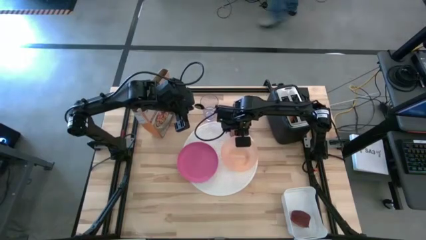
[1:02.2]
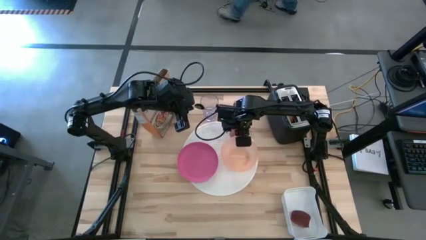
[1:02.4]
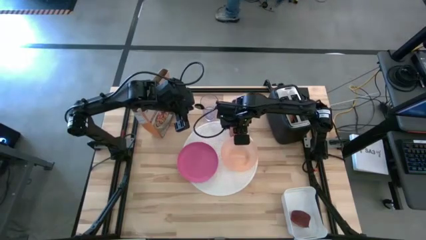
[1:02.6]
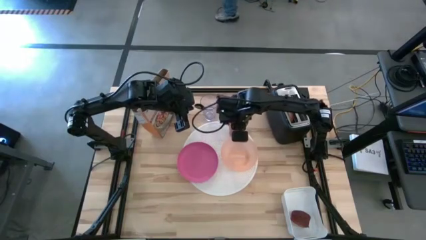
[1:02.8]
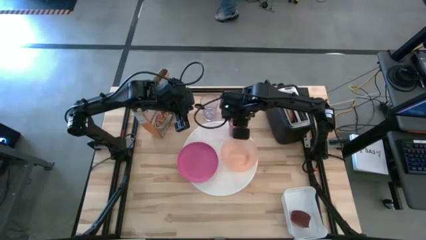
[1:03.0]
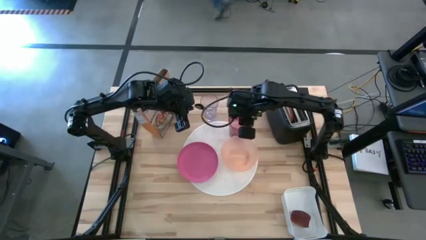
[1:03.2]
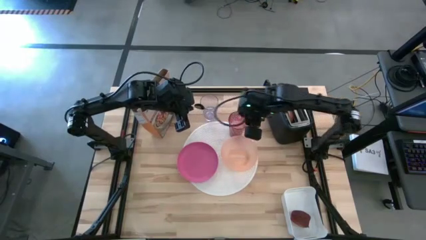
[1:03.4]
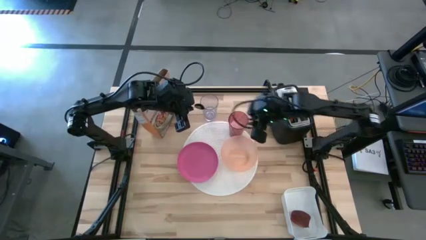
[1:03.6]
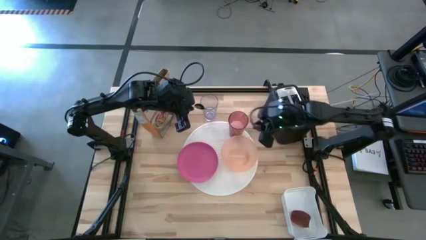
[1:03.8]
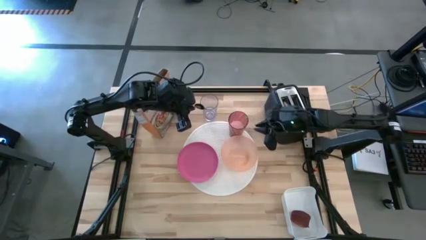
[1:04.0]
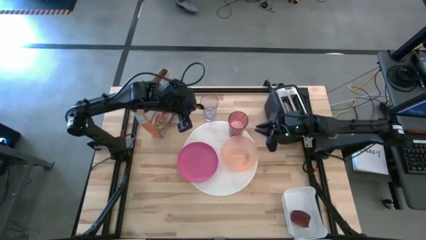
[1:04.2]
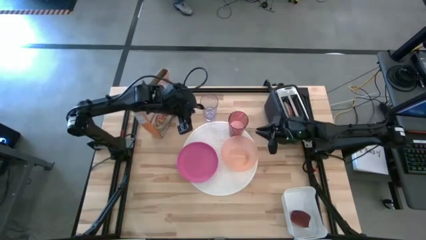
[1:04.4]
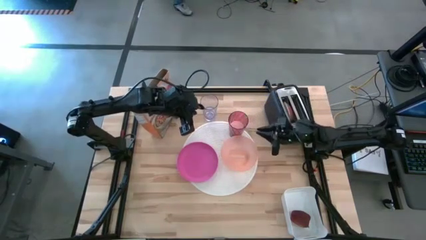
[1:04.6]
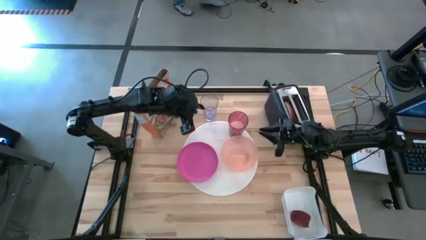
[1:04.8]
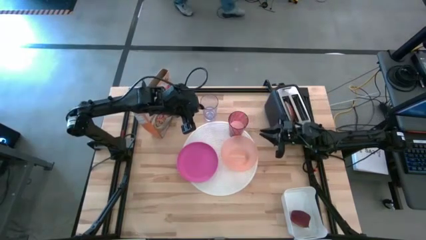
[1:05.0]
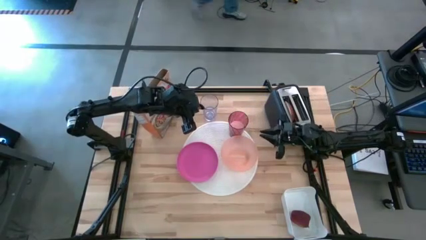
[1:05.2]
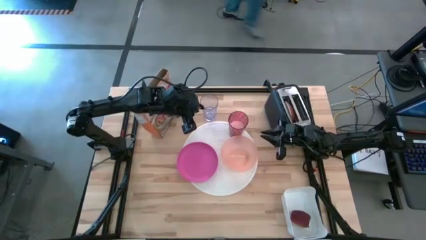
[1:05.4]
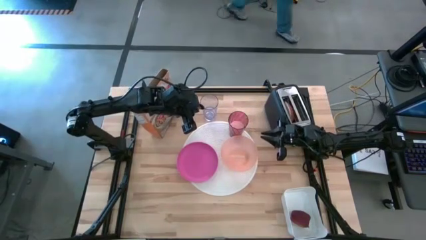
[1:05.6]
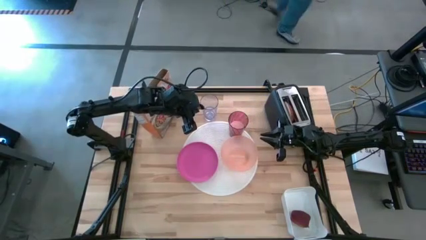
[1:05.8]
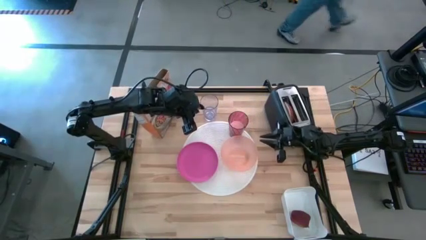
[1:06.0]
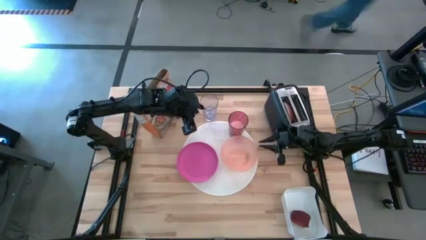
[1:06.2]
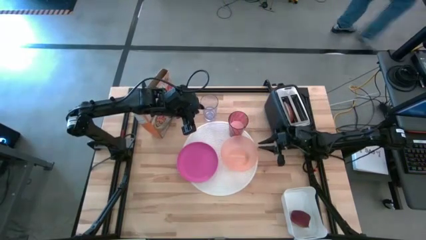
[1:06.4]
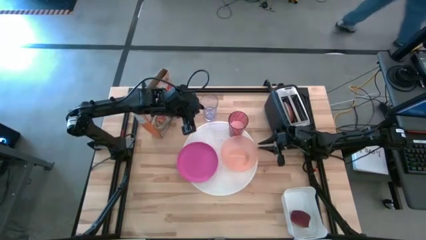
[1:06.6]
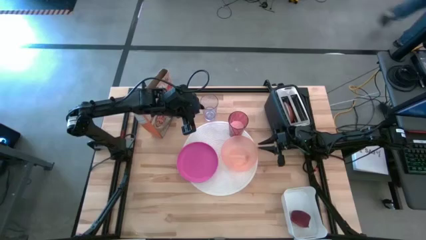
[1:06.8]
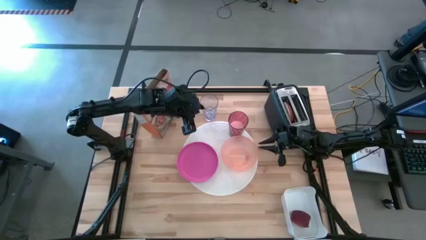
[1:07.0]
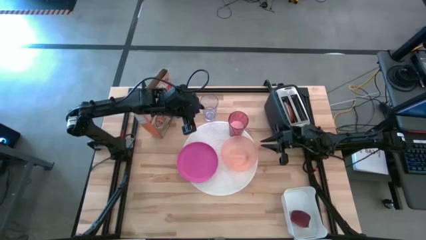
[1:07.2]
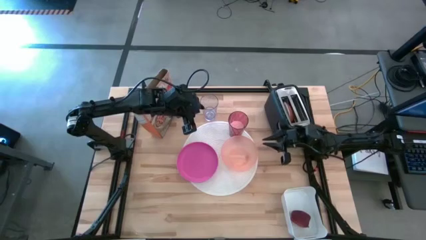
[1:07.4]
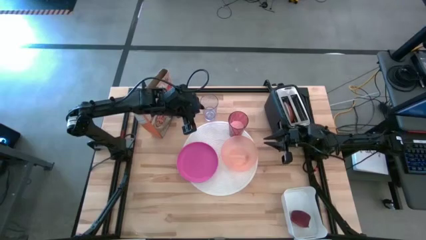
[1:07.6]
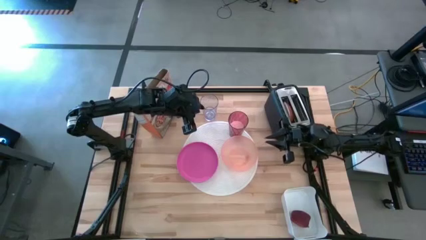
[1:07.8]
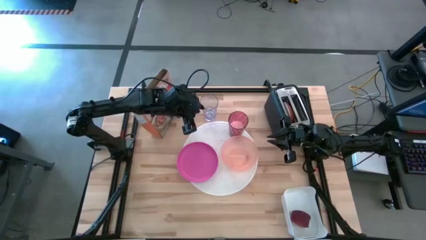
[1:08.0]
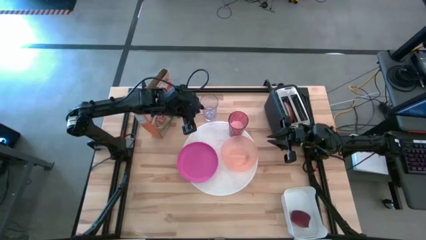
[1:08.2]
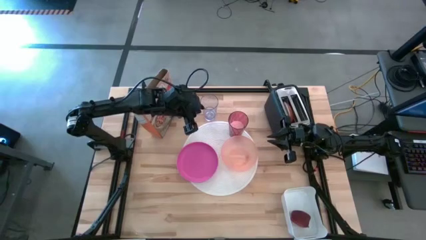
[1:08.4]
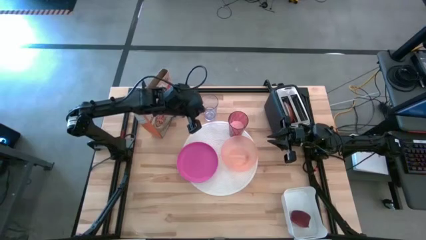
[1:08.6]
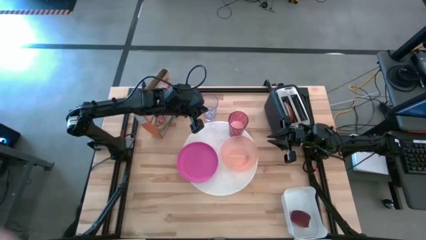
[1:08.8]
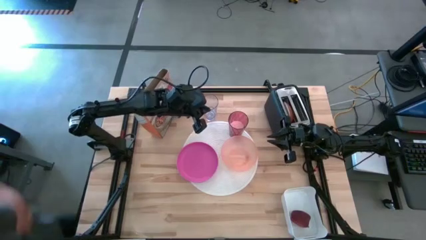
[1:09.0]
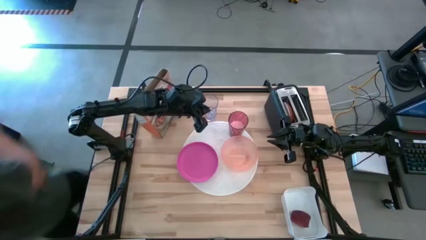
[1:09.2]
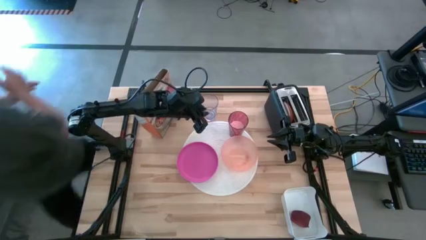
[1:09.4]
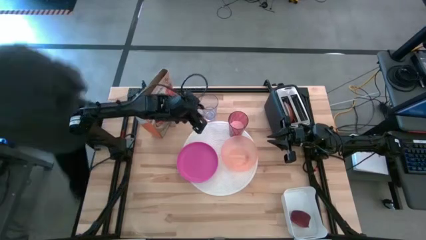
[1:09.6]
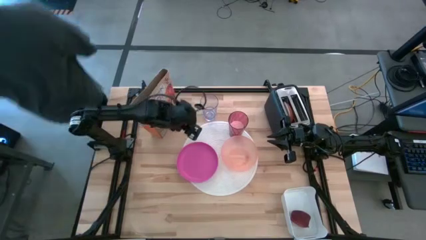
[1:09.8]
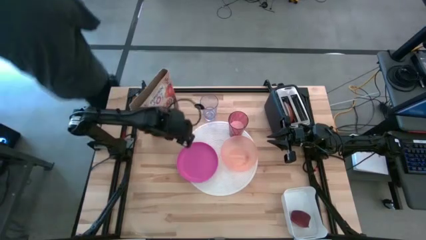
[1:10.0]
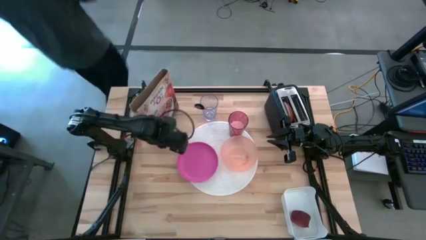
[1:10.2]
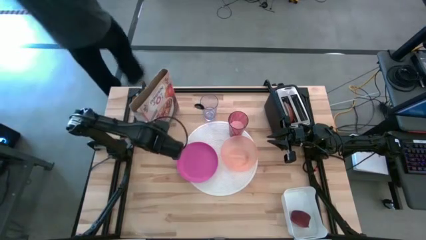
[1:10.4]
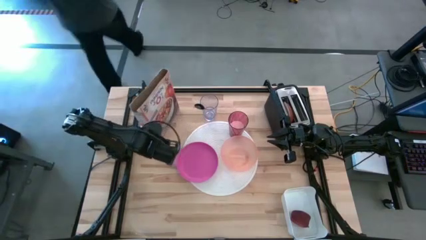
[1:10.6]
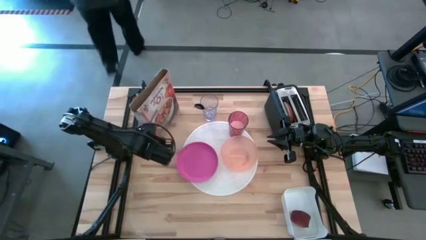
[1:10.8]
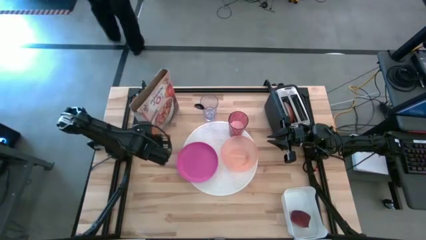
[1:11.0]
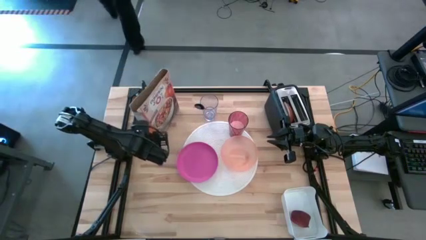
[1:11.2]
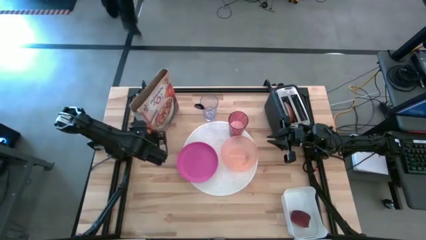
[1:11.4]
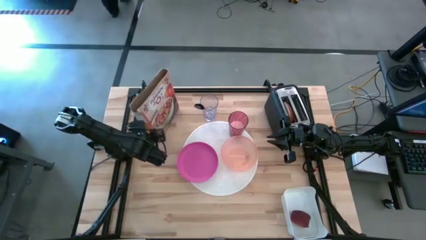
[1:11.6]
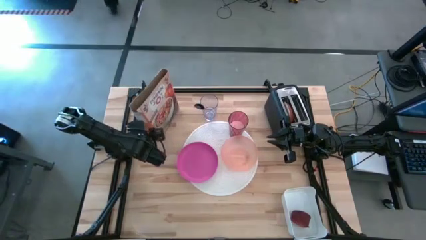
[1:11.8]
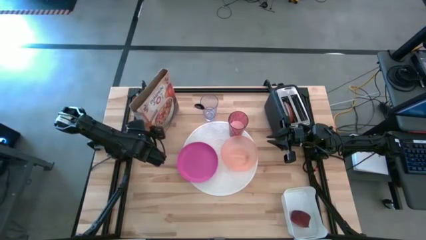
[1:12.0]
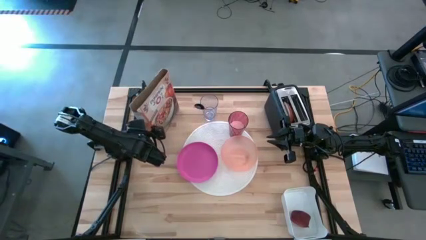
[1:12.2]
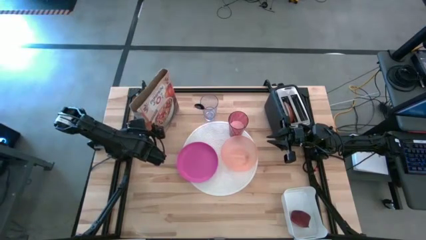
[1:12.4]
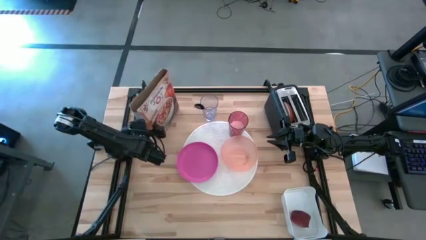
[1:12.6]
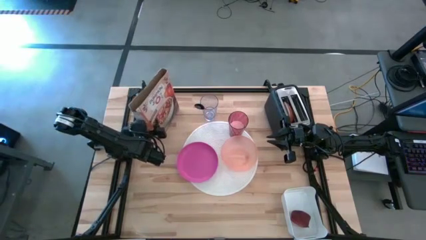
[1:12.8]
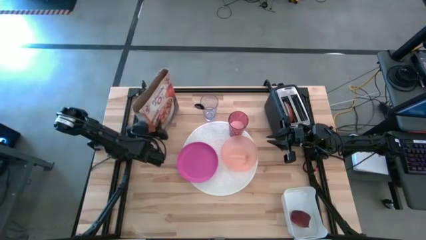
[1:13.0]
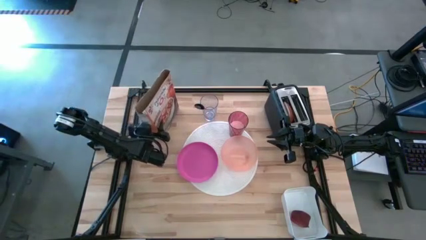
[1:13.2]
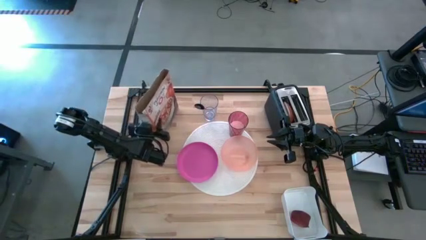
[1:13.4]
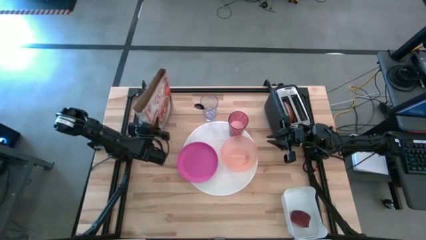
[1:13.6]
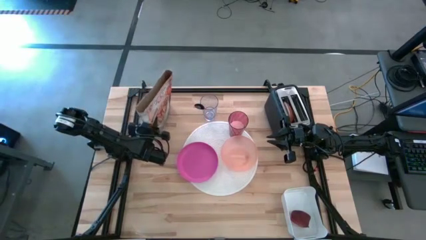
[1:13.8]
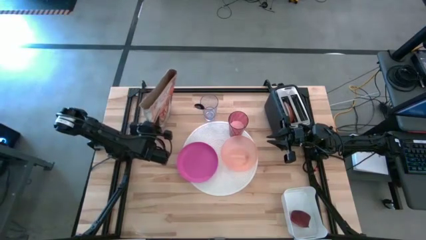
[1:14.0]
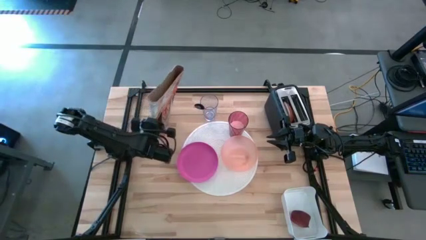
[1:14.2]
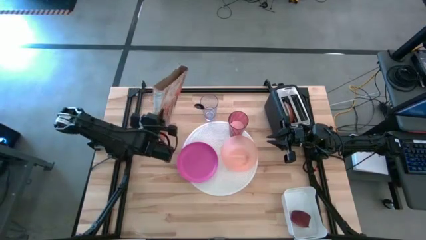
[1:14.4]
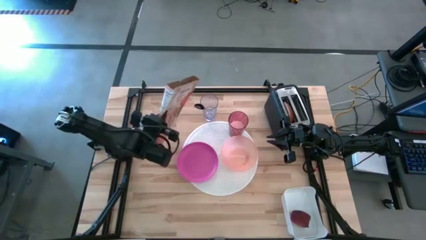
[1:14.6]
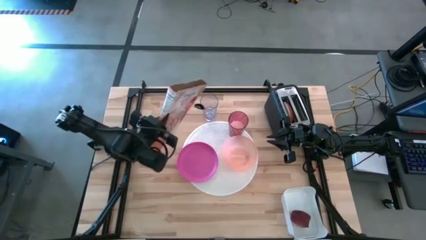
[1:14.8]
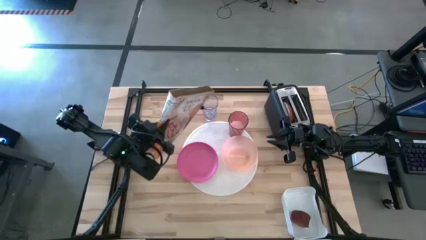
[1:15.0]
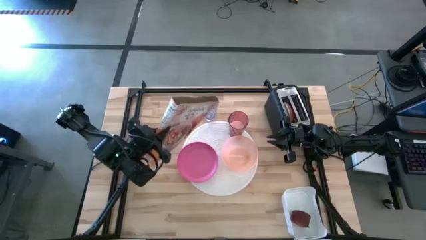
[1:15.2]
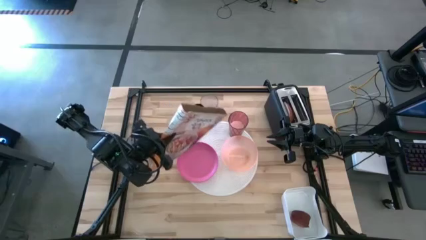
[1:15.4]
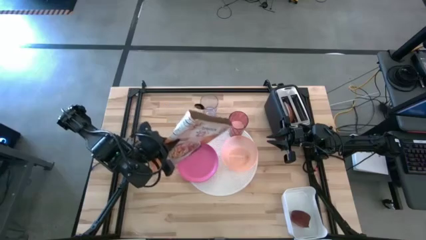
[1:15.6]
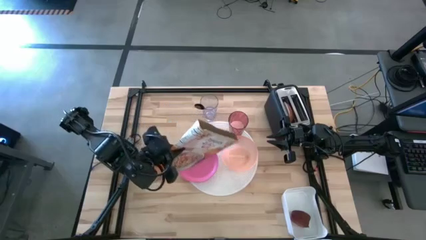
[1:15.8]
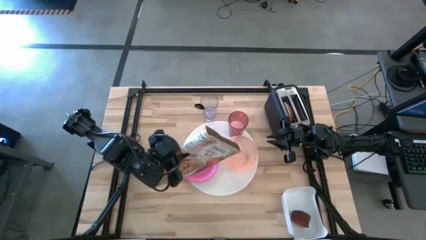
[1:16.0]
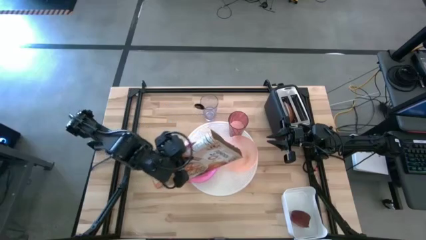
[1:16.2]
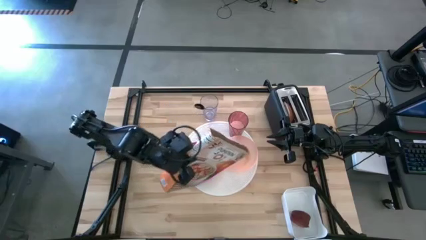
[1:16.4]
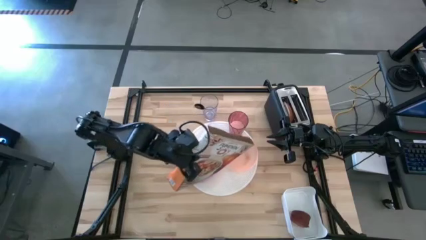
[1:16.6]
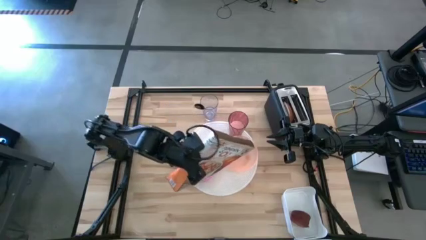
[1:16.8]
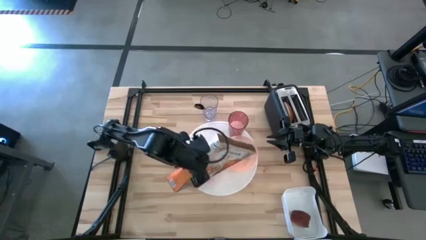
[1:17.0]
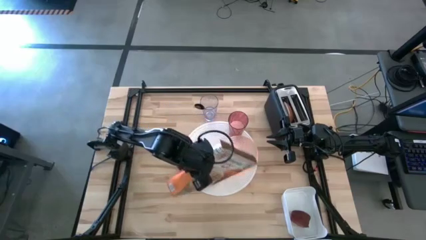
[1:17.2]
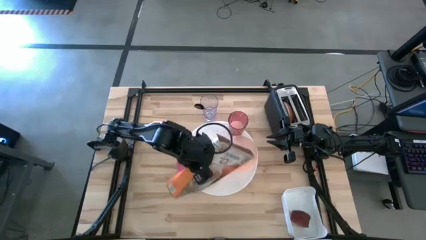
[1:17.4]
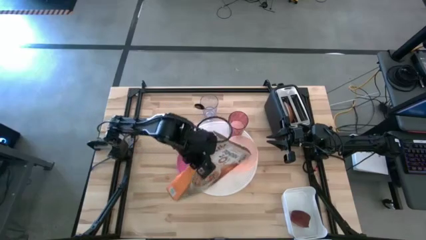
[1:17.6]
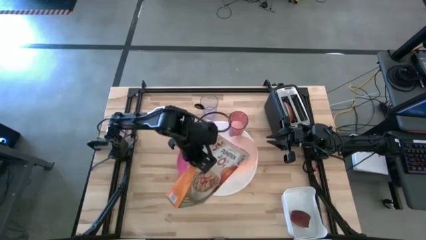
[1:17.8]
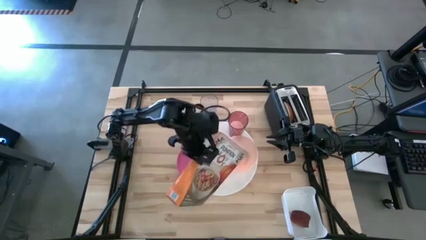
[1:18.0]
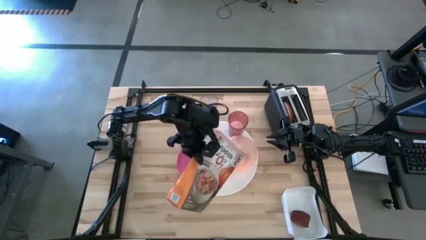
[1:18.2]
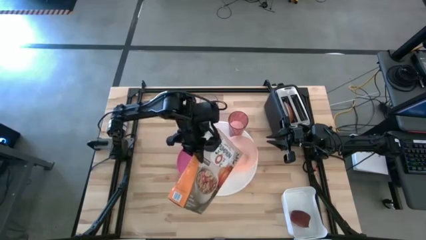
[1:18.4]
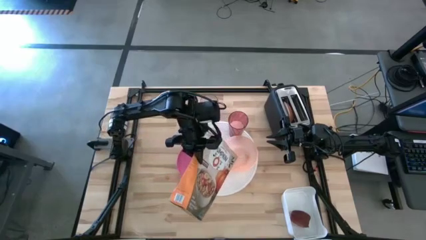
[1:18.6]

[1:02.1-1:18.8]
Task: Arrange a breakfast setting
Pour the cereal from the orange cereal box into the orange bowl
